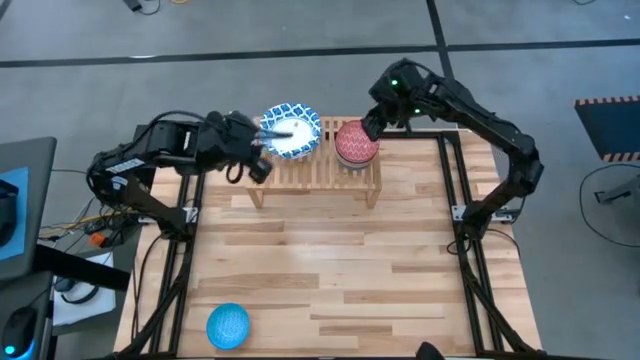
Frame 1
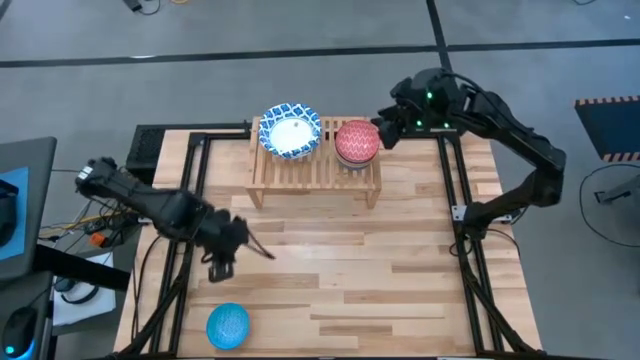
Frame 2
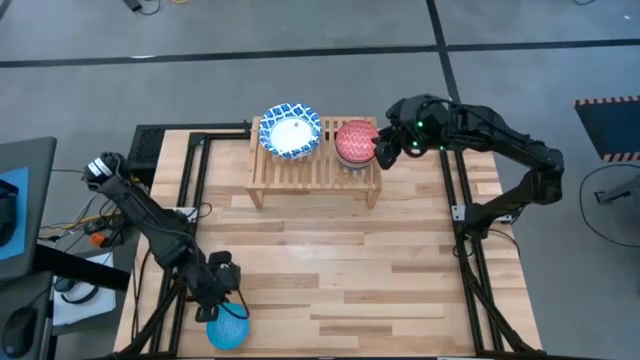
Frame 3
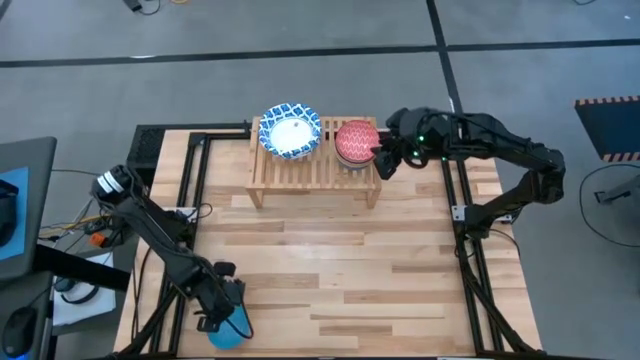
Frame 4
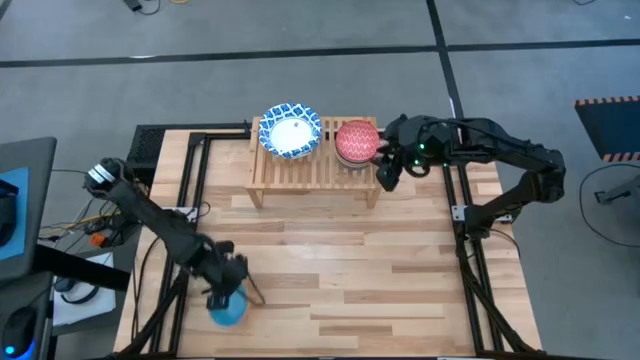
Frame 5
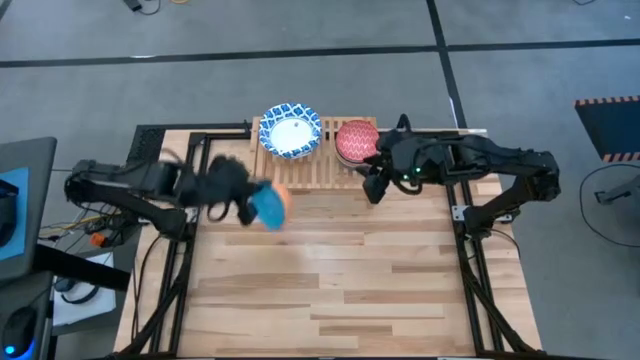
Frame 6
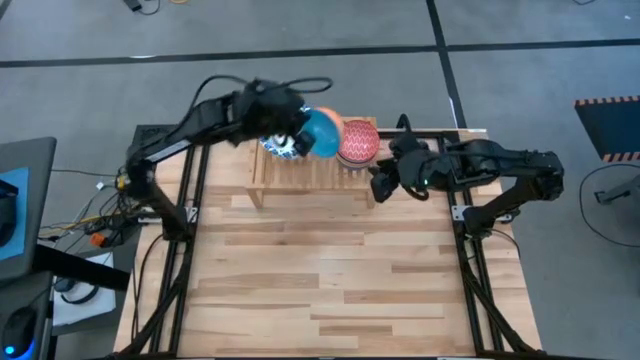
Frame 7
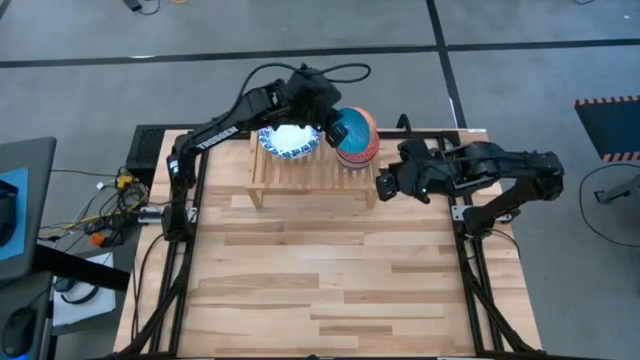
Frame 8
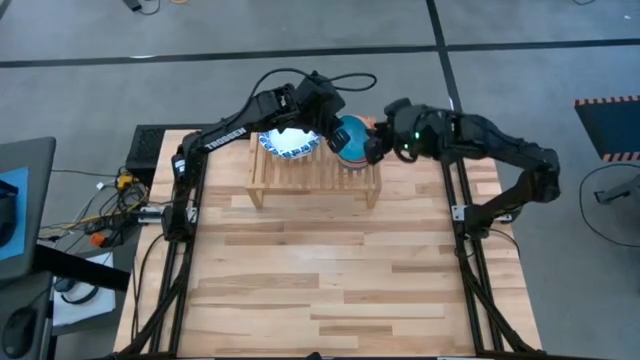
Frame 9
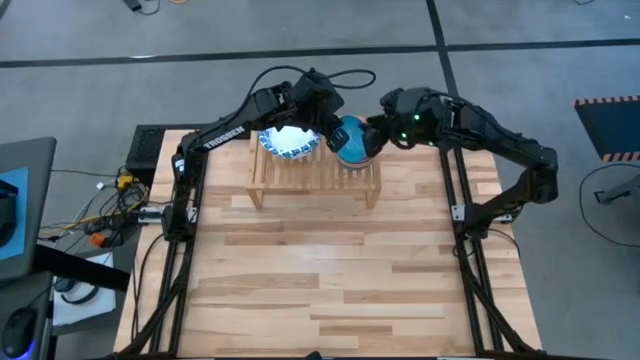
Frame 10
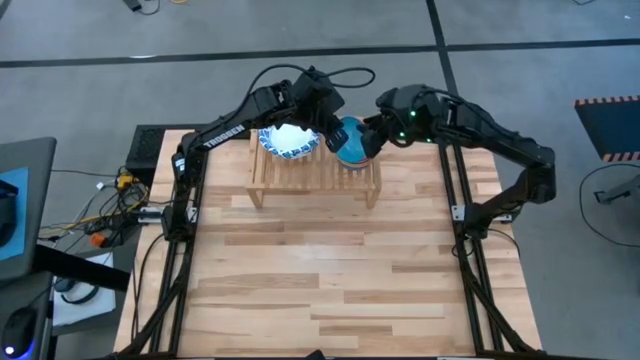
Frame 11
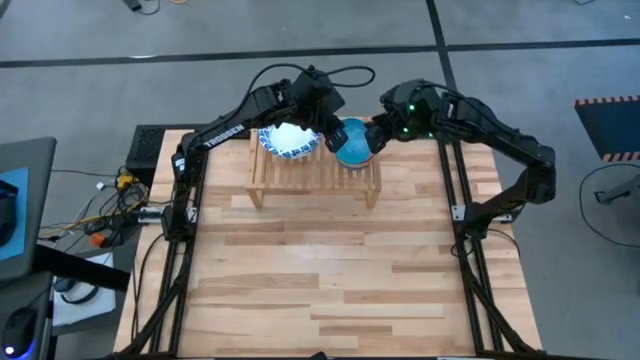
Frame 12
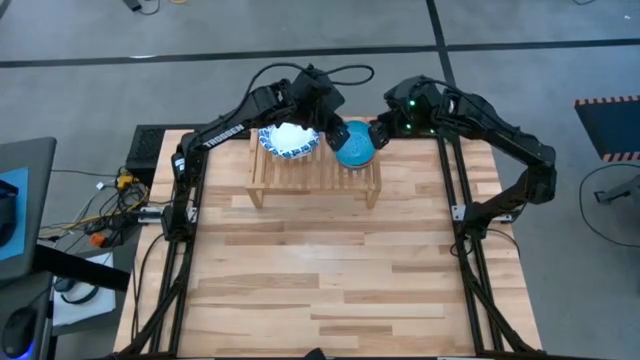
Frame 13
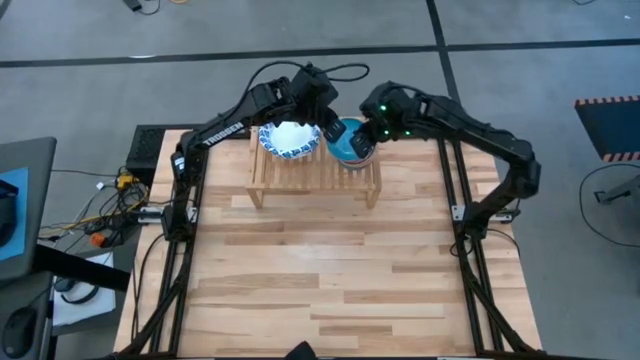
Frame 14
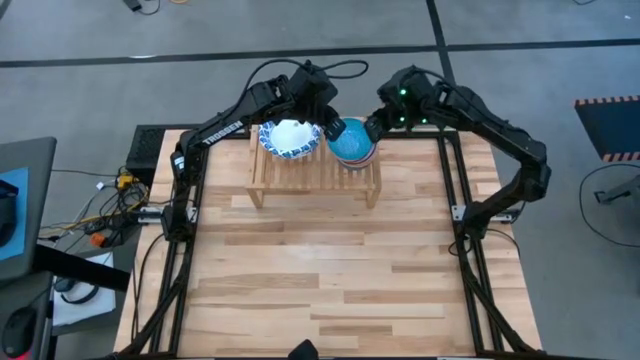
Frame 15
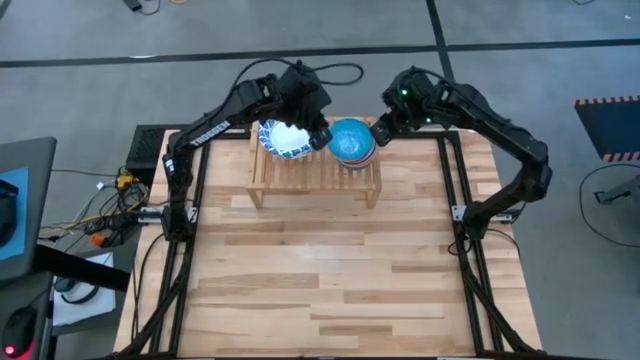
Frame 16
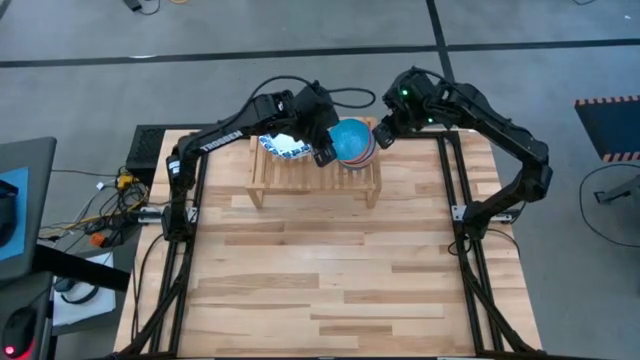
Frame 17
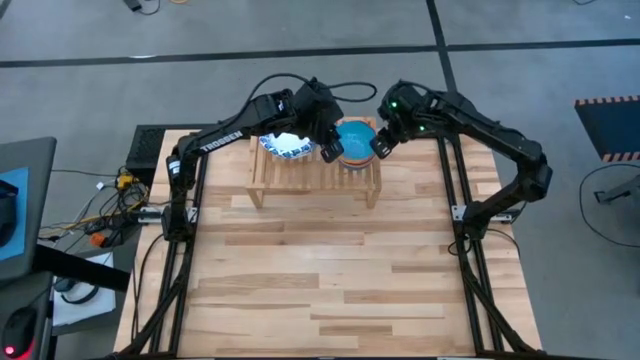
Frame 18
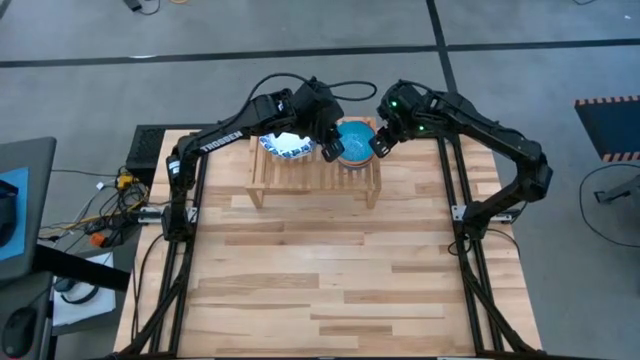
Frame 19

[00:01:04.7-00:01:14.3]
Task: Place and stack bowls onto a shelf
Stack the blue bowl on top of the red bowl on the shelf

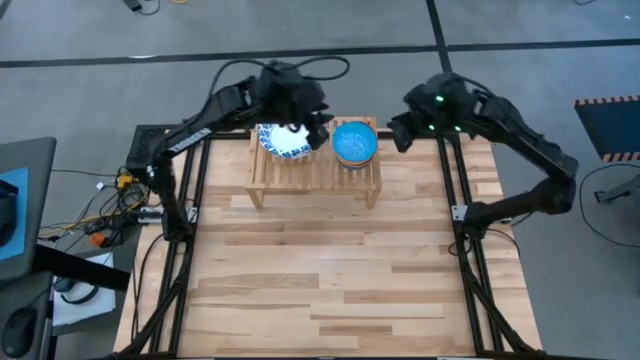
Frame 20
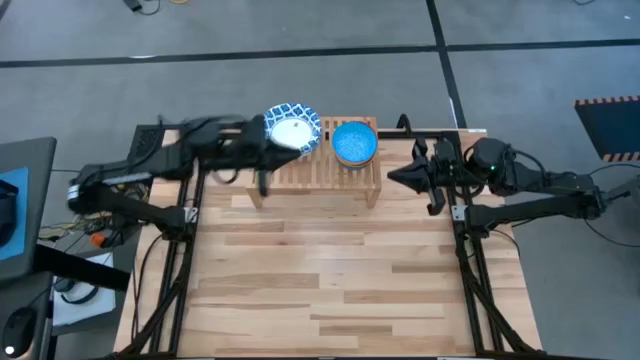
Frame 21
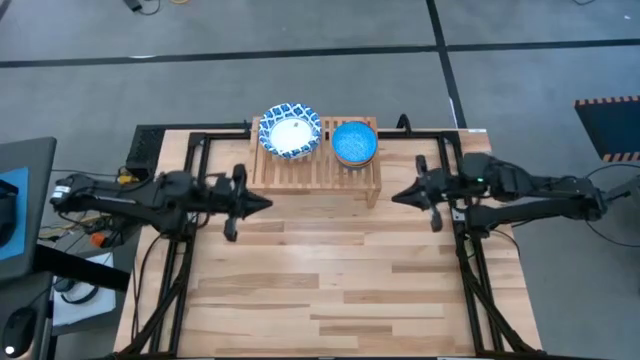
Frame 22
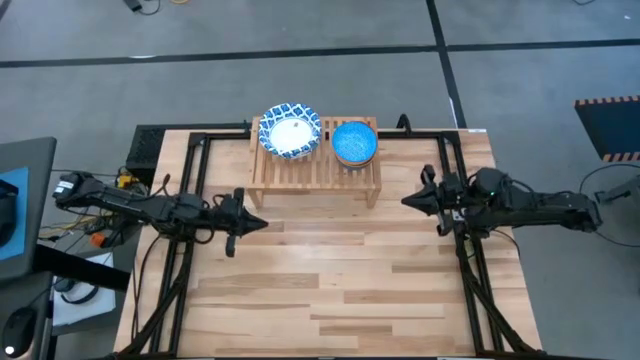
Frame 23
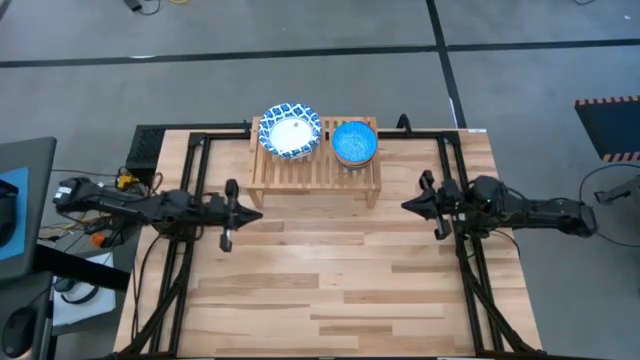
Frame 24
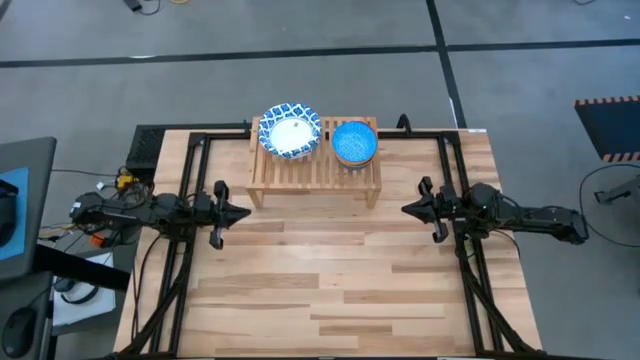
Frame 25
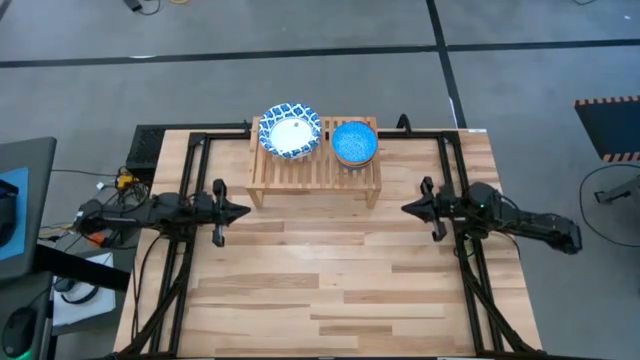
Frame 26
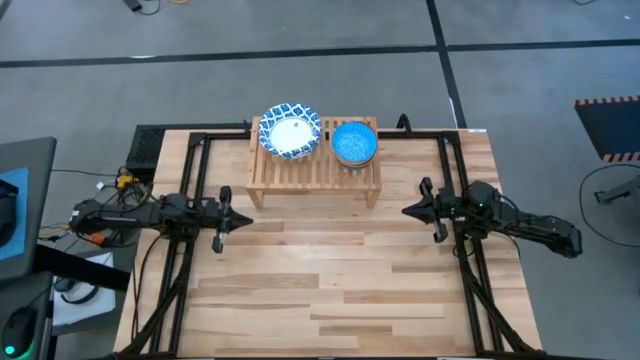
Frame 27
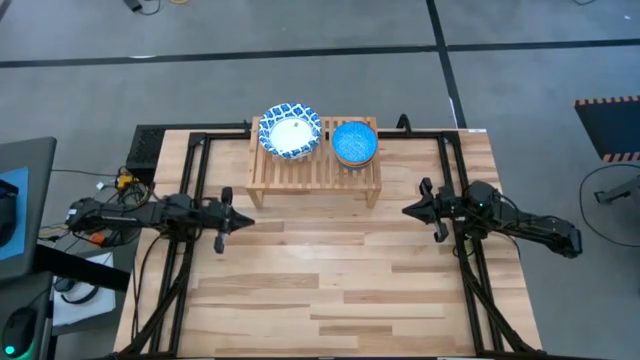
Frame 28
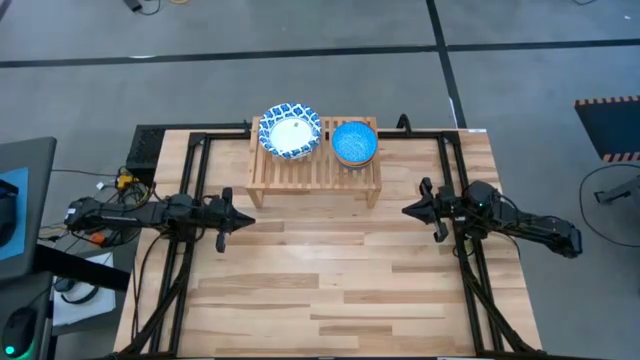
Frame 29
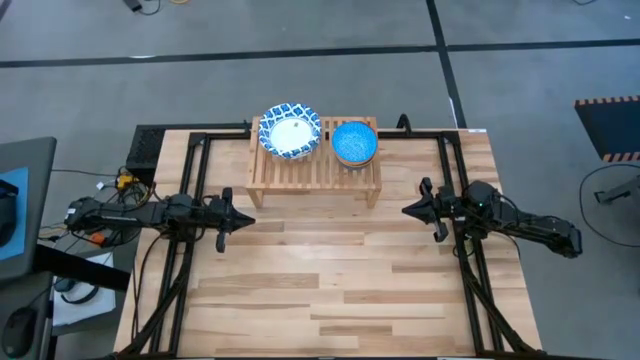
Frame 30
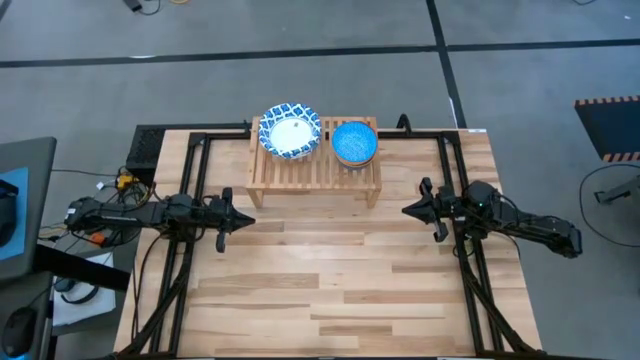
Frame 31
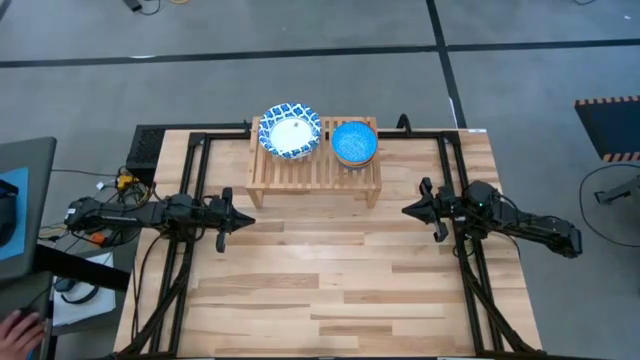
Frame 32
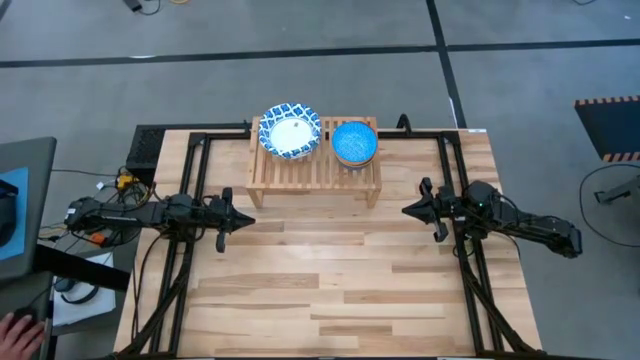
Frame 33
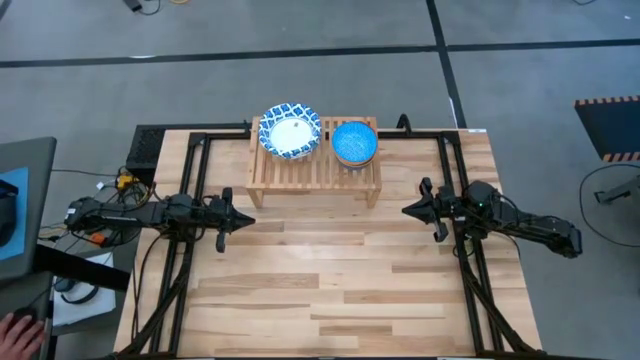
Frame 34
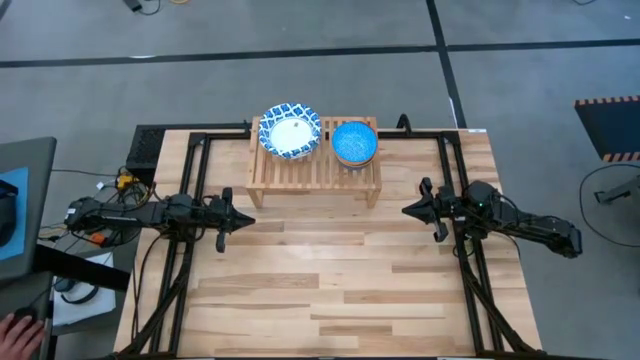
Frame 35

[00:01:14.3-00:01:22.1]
Return to Home Position

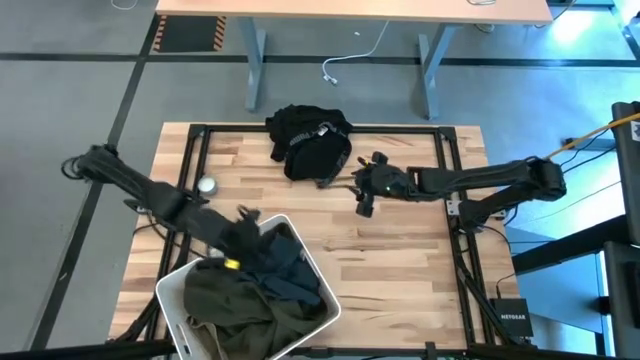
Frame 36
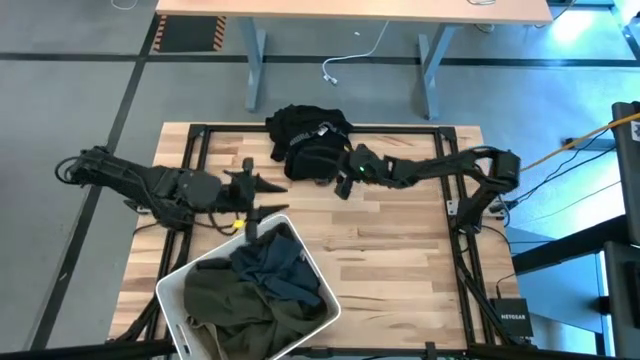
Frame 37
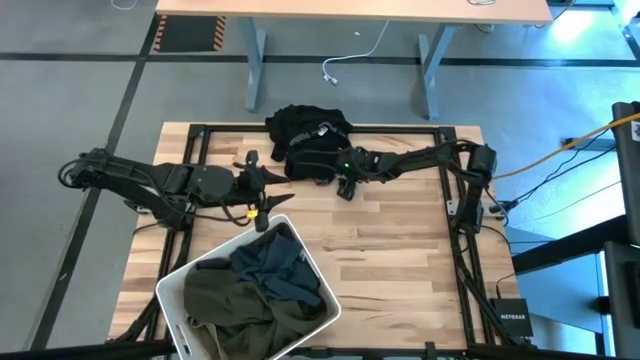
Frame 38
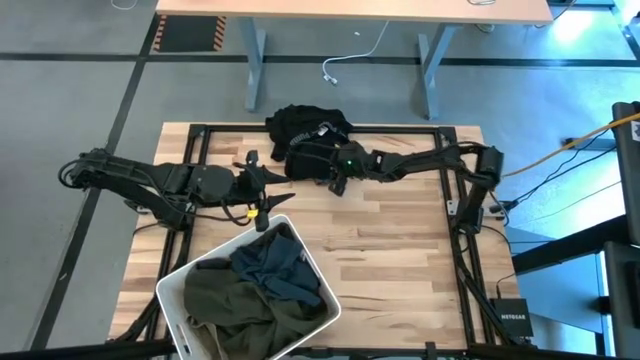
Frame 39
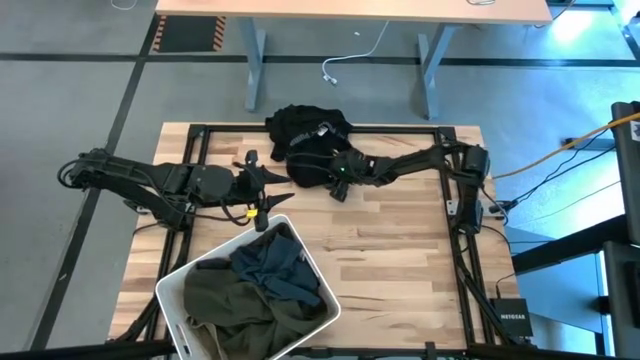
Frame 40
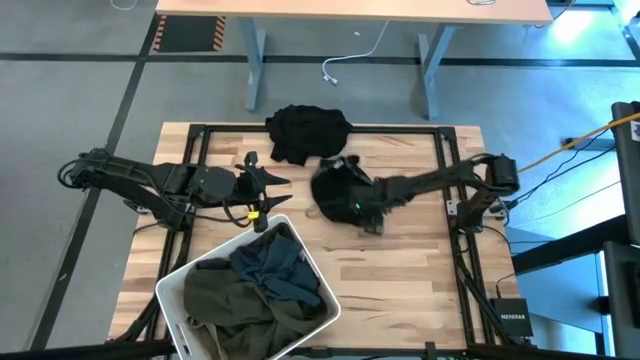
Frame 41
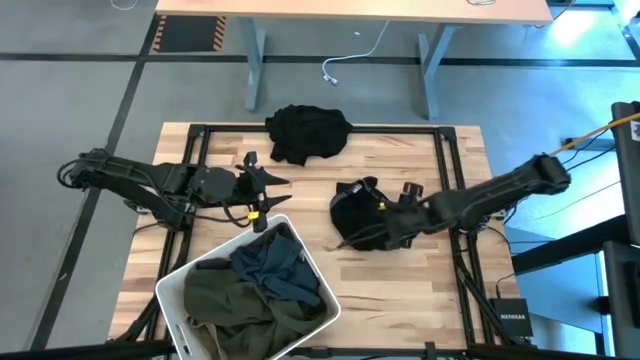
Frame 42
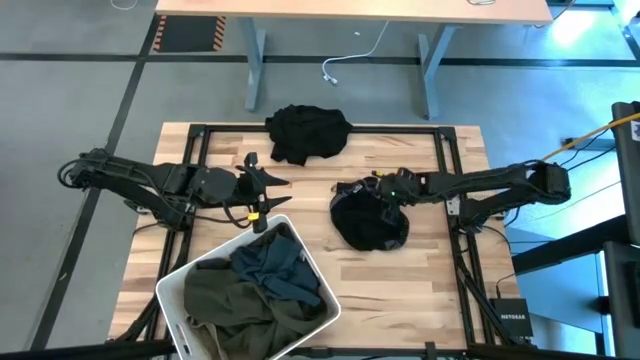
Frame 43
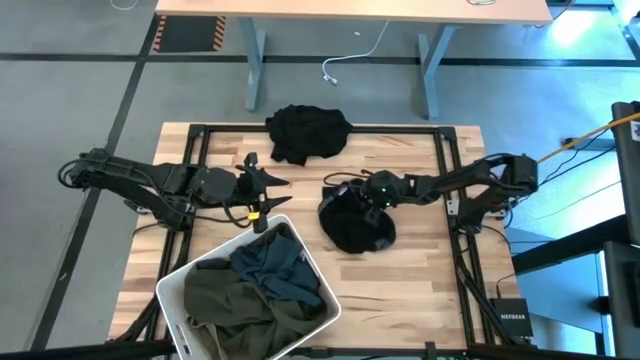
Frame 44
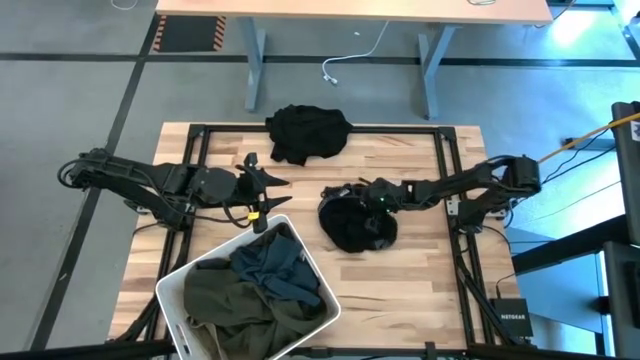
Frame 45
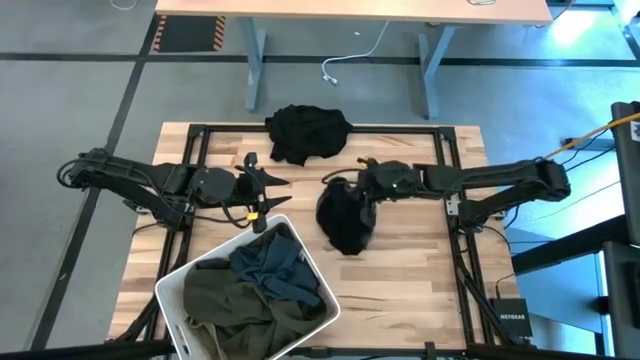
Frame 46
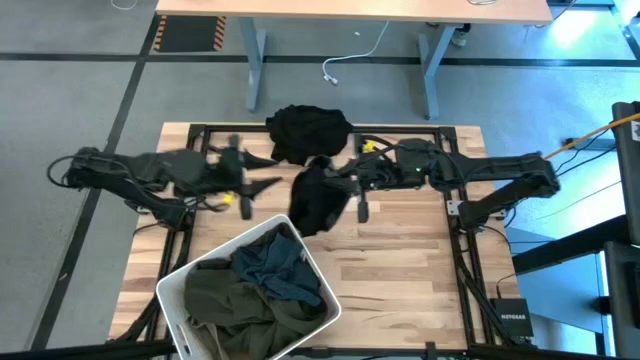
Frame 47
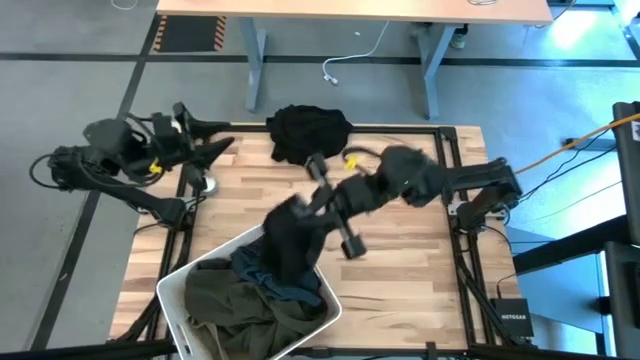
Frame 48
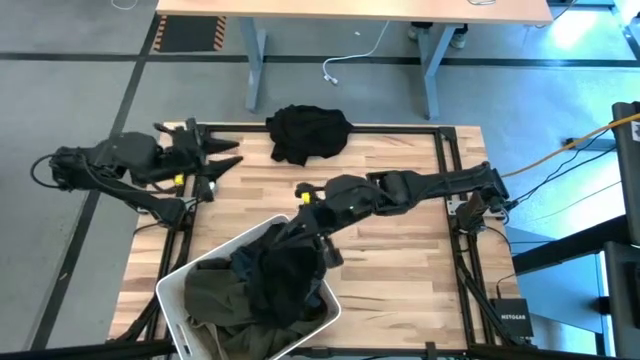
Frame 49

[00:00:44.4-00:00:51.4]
Task: Sort clothes
Put the black underwear into the white bin
